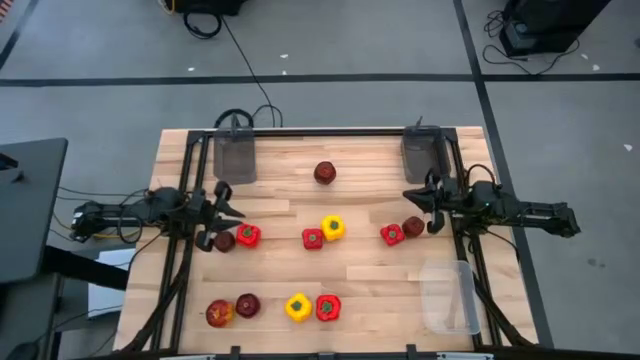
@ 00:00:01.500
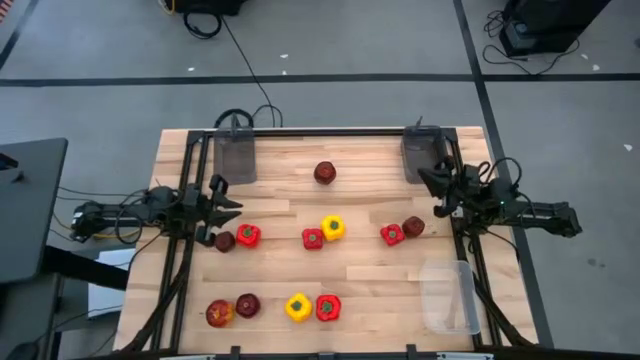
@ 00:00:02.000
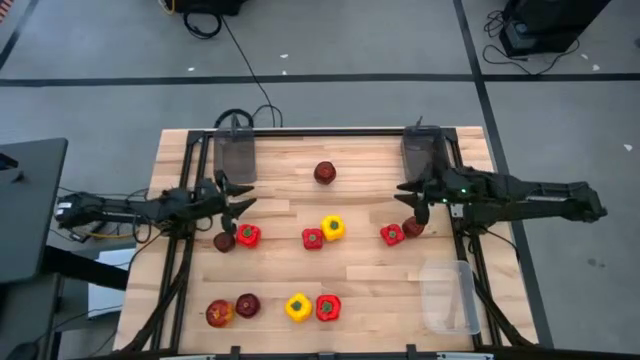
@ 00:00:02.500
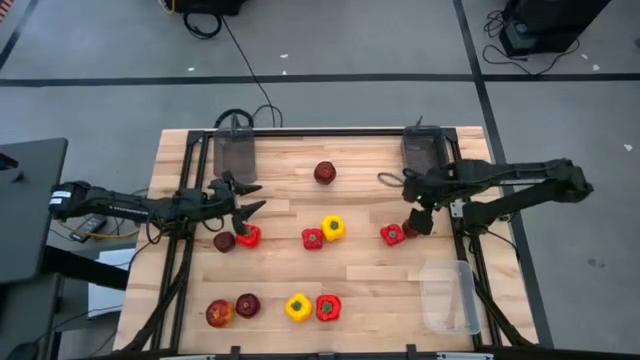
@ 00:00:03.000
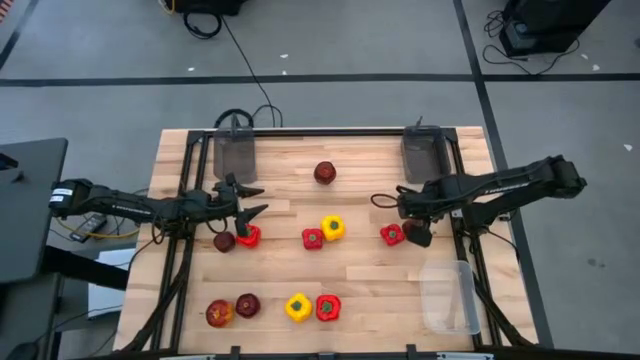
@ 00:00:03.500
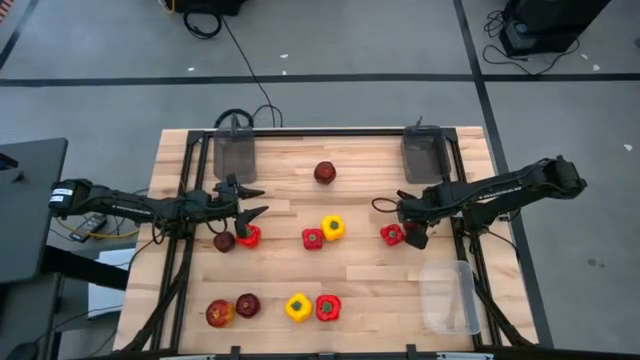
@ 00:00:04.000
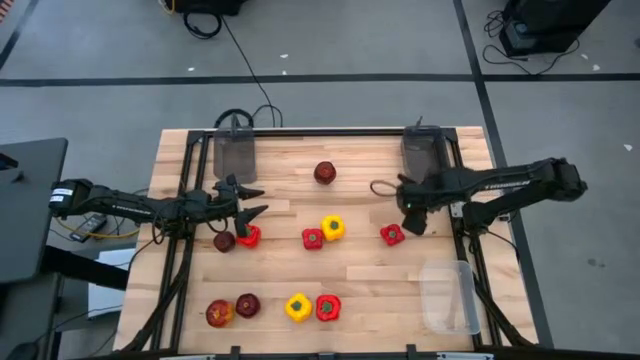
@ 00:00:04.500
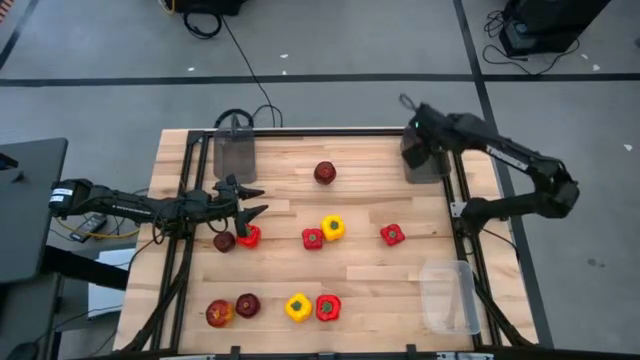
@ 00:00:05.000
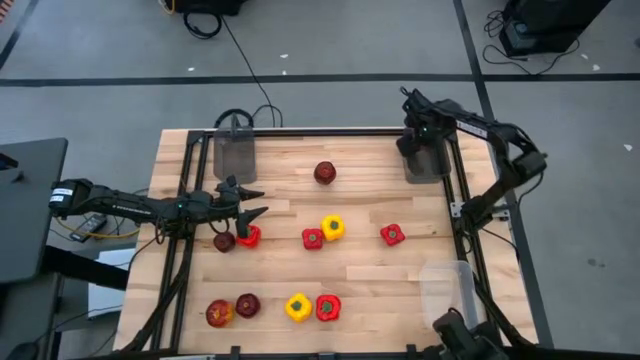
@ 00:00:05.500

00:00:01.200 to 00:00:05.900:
Task: Sort produce into baskets
Put the middle right apple into the right dark gray bin

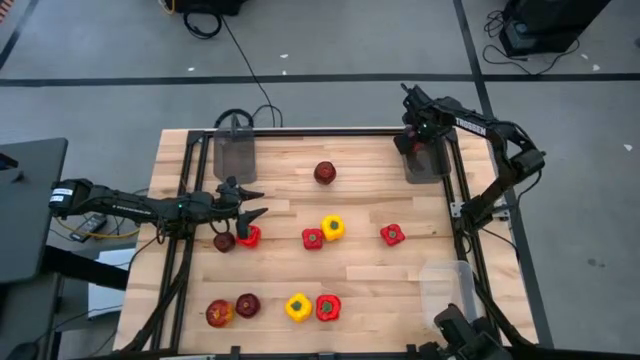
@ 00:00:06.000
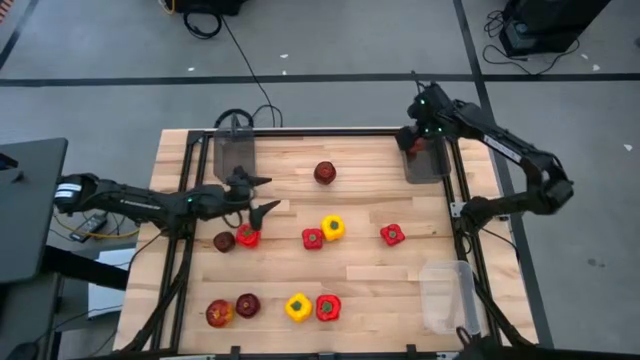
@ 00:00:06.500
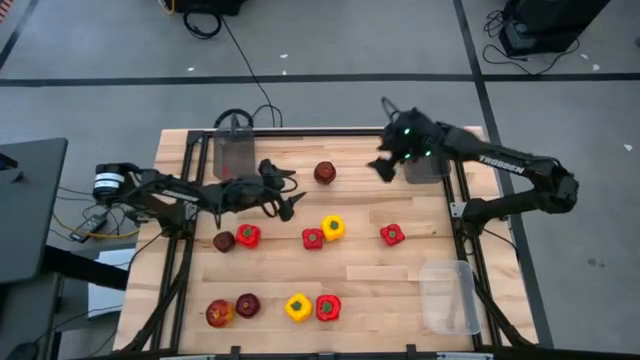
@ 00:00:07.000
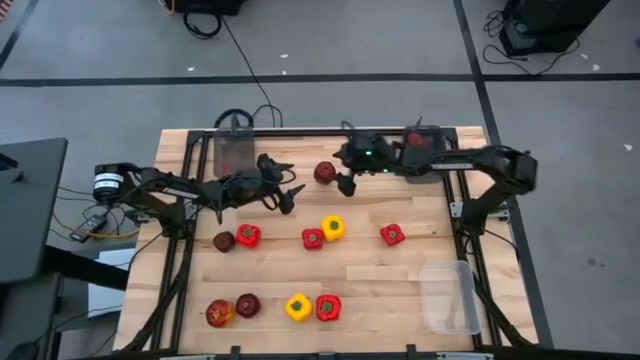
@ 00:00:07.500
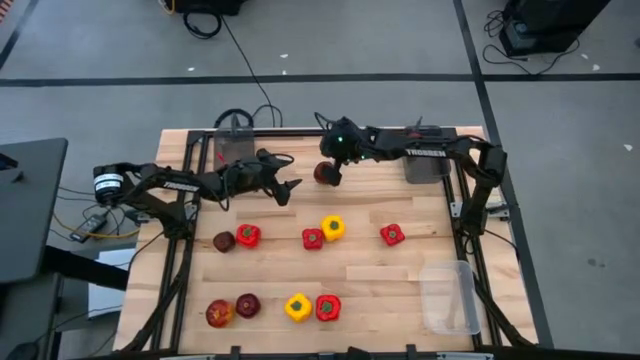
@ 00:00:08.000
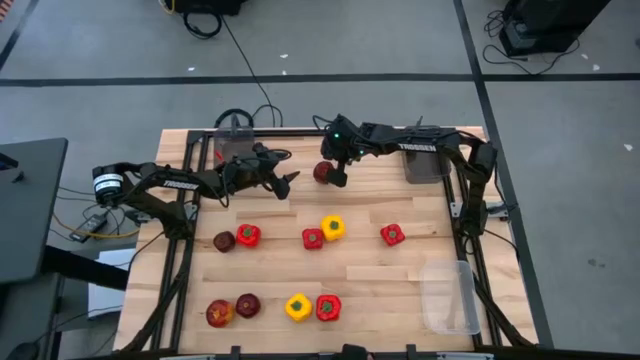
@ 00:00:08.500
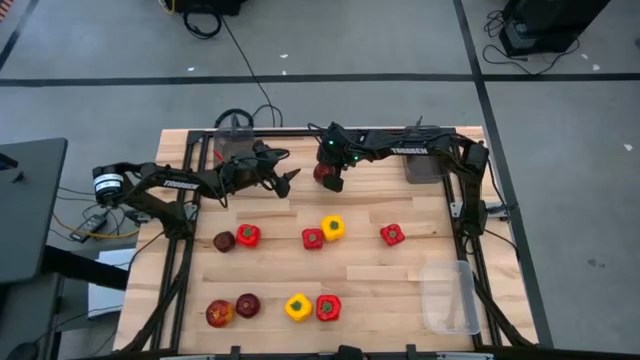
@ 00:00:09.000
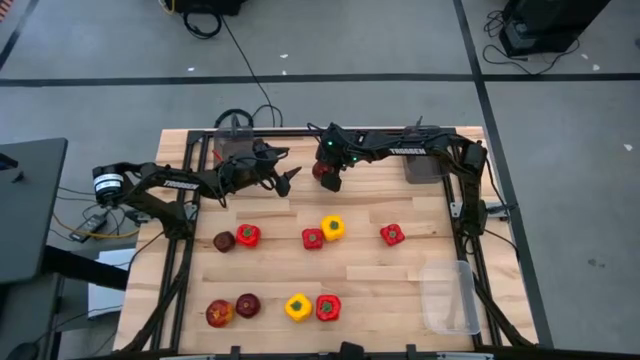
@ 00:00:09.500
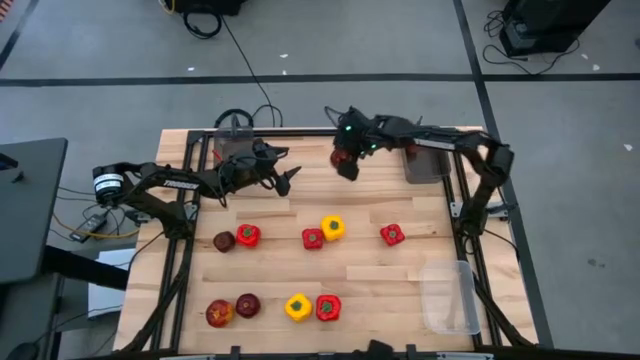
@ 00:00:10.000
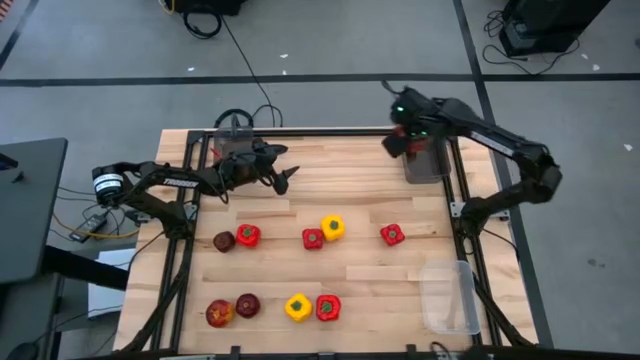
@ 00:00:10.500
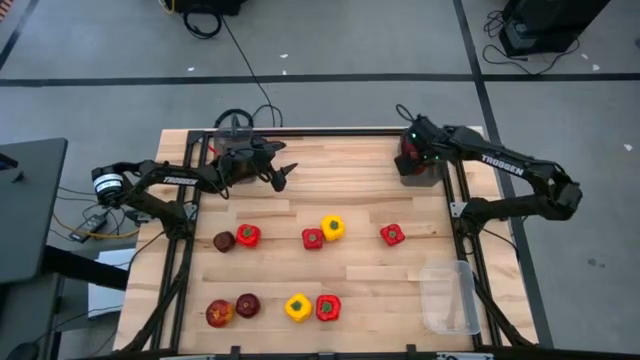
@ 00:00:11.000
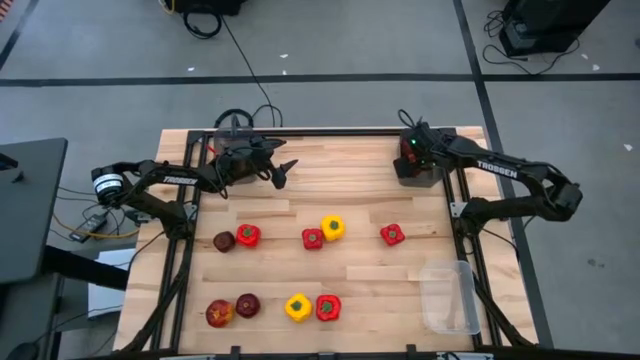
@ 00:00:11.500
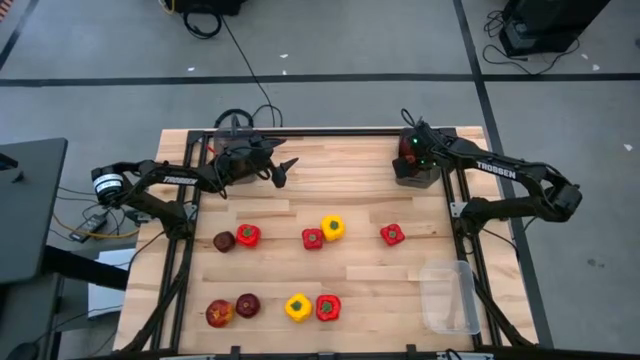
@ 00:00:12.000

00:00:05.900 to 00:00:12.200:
Put the top apple into the right dark gray bin

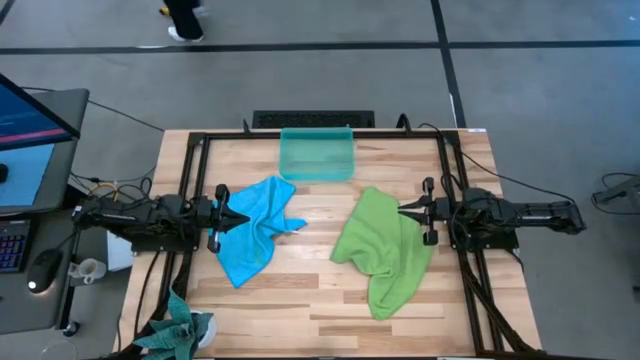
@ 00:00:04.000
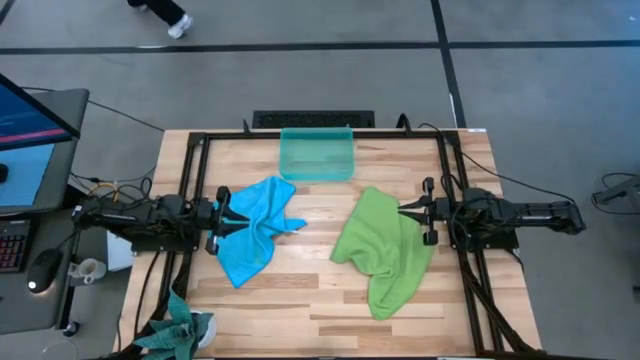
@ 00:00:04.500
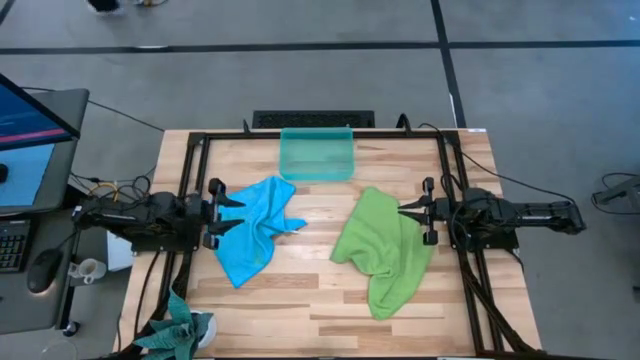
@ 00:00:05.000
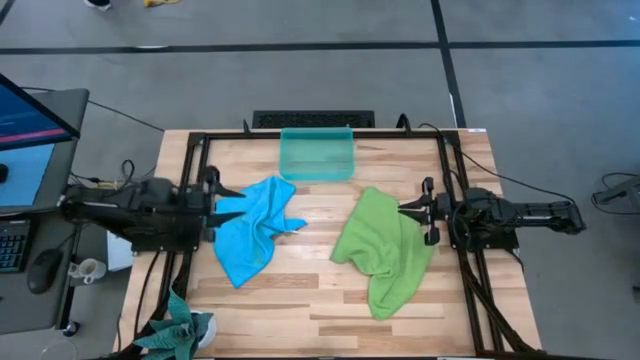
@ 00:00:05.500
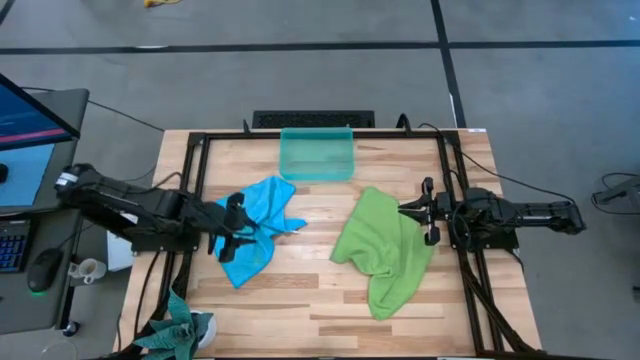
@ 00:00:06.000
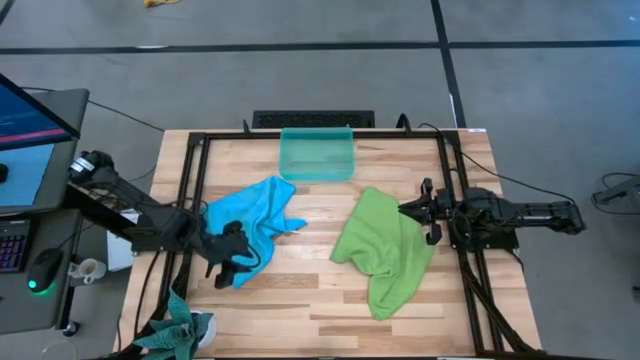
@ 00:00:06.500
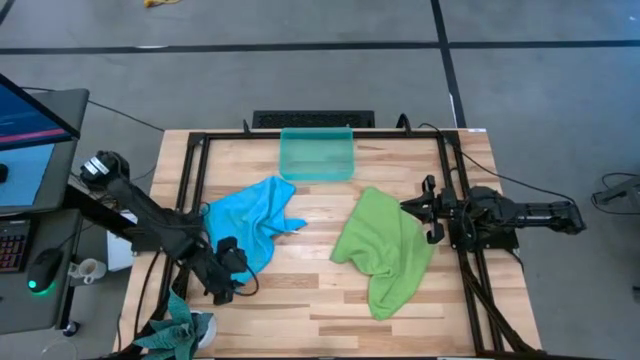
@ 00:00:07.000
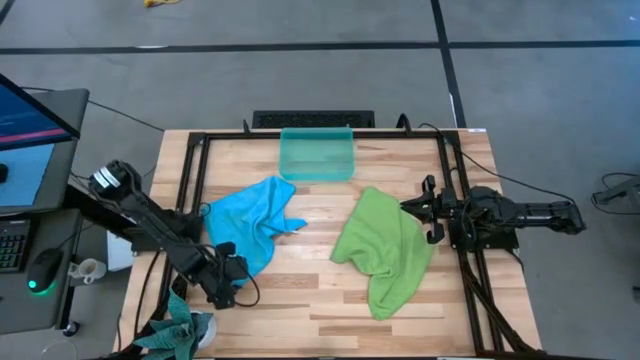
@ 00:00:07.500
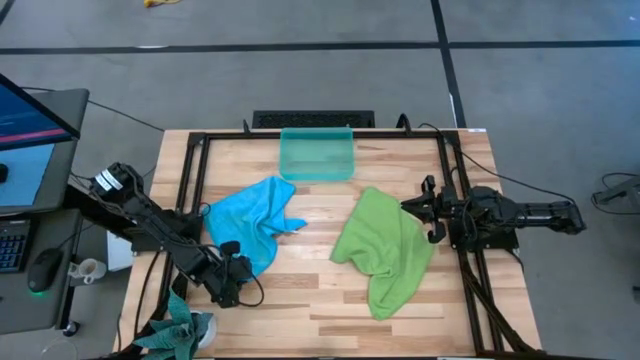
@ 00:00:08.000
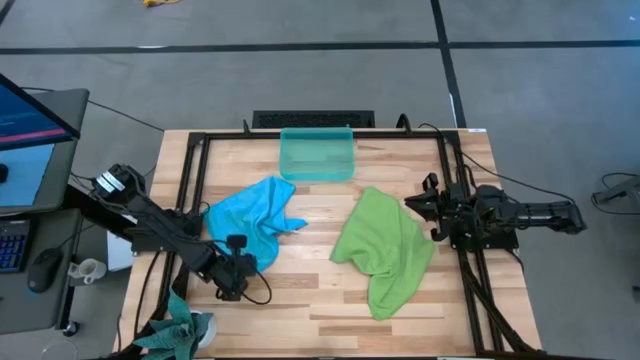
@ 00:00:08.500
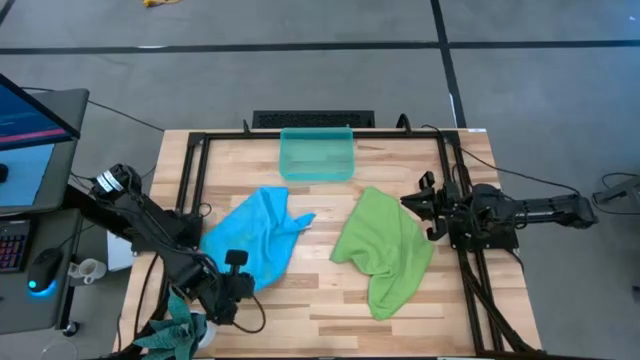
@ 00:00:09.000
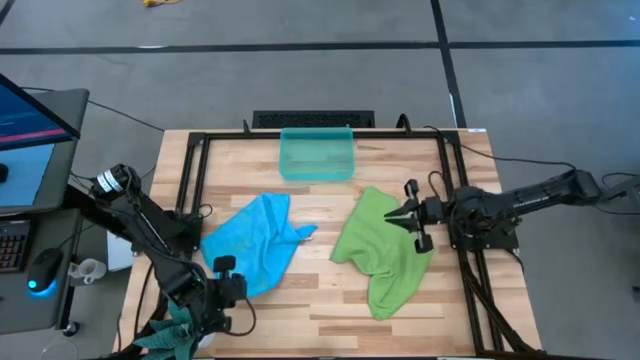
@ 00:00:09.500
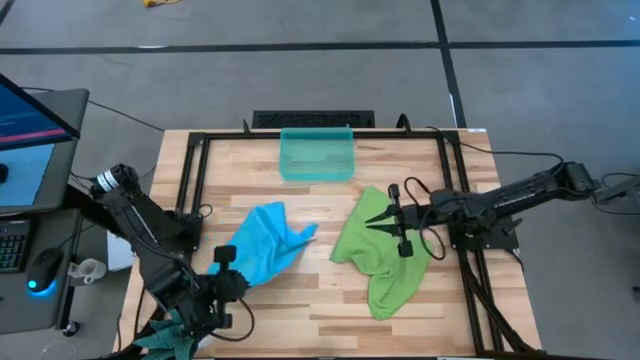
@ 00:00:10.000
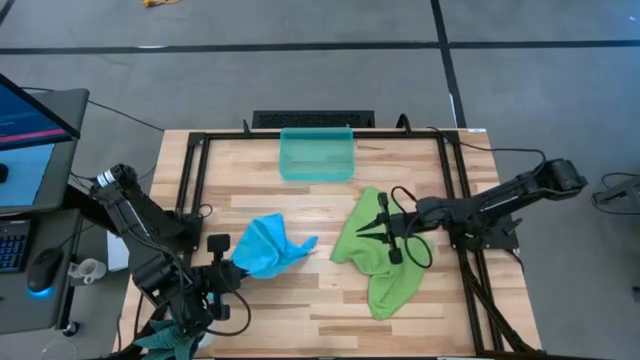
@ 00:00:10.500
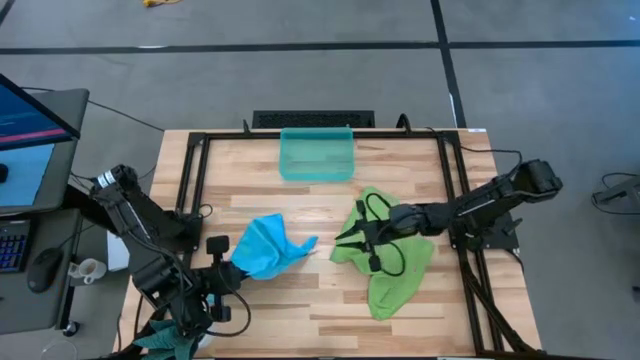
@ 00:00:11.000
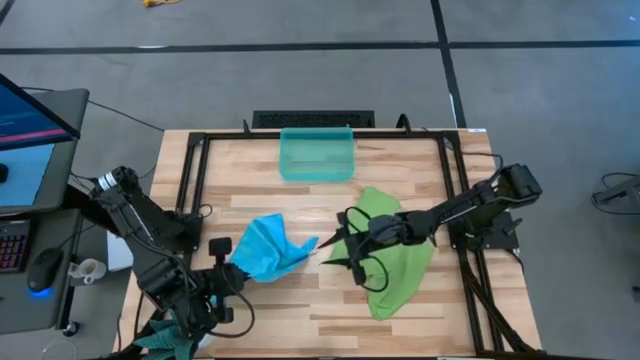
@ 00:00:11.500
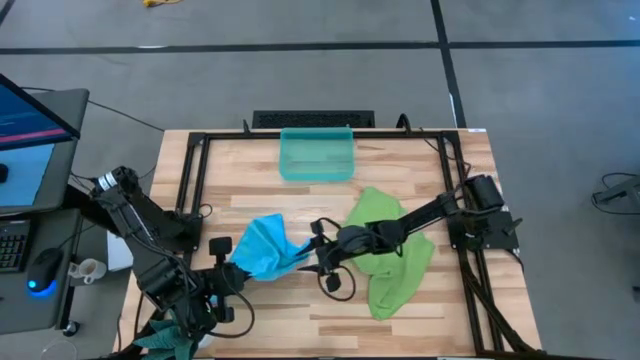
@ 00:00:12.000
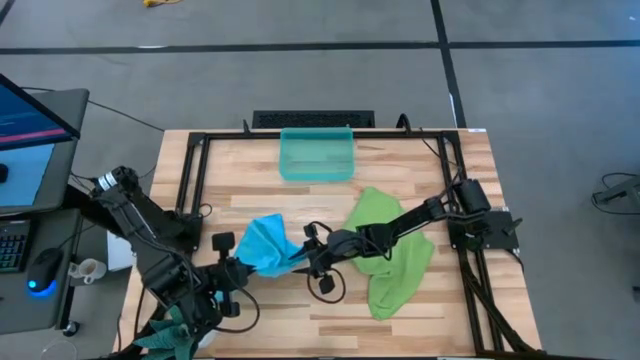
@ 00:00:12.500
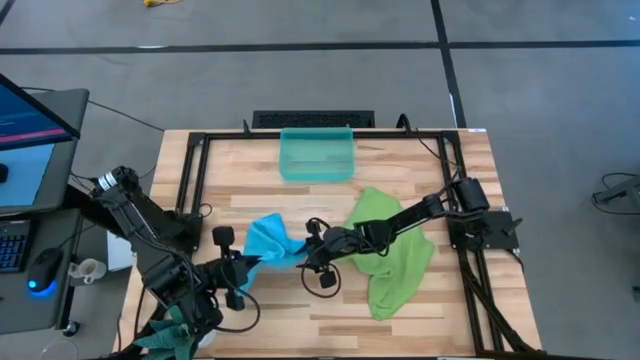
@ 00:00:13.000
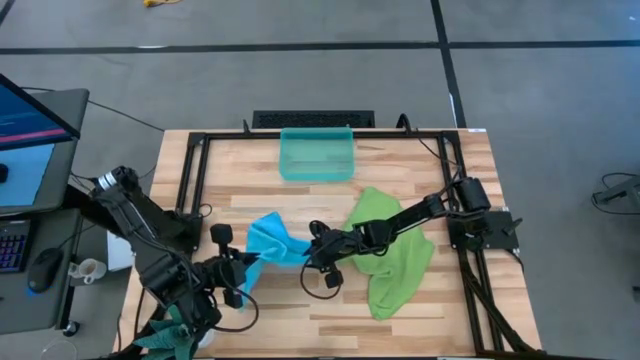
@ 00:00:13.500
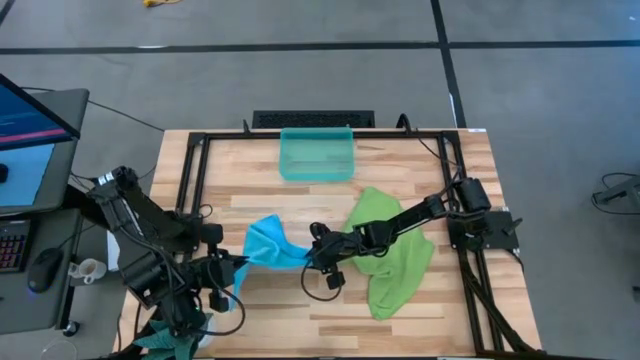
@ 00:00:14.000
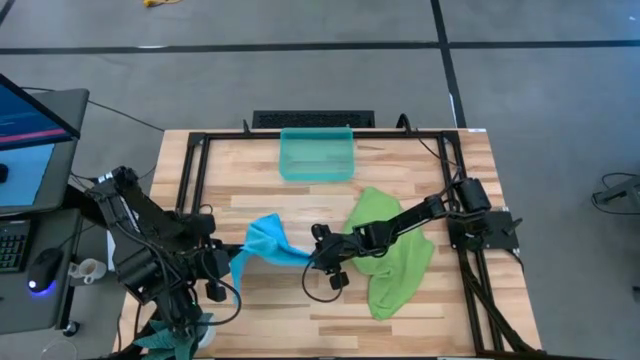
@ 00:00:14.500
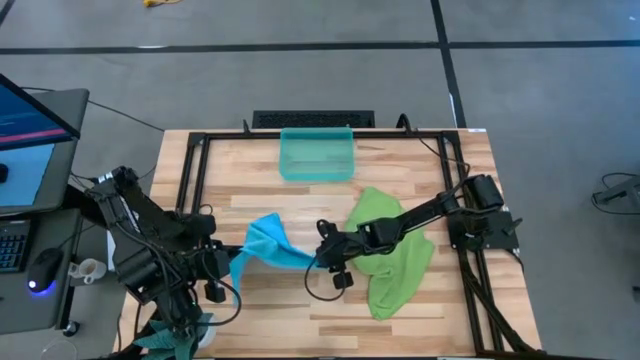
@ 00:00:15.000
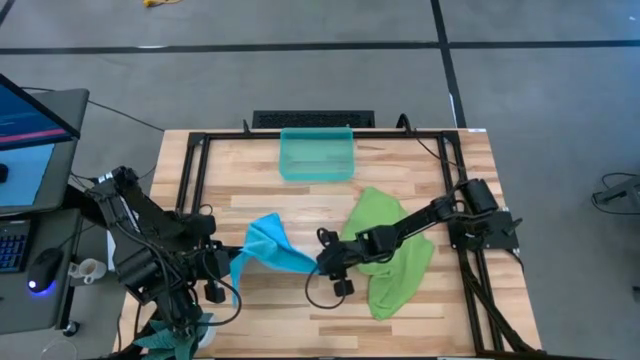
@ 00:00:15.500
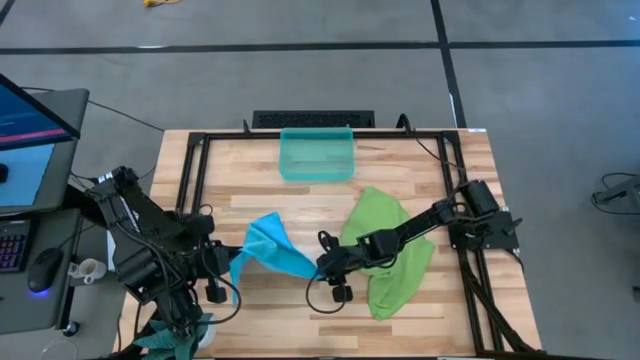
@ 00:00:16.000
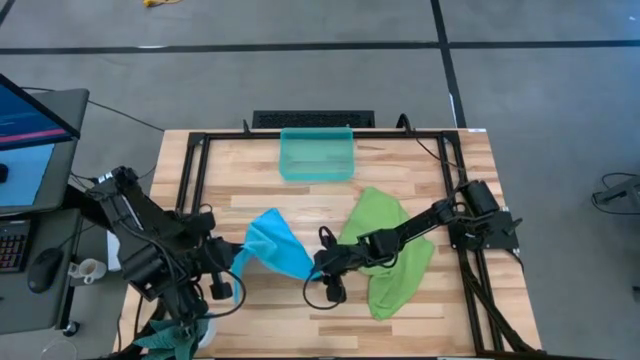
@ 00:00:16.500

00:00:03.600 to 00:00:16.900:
Task: Roll microfiber towels into tight, uniform cylinder then place into a basket
Fold the blue microfiber cloth
